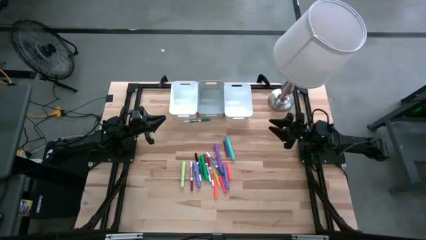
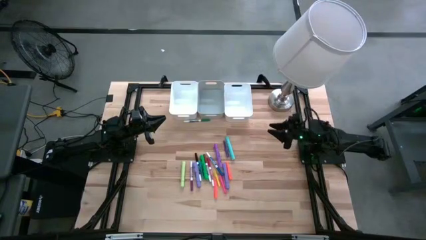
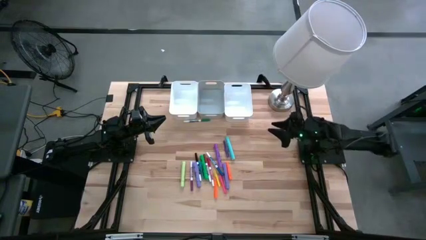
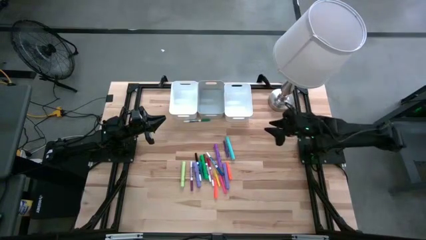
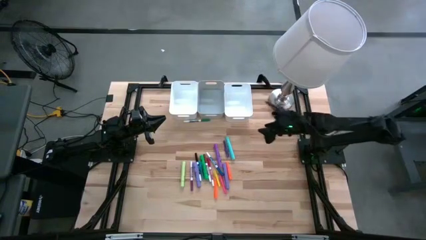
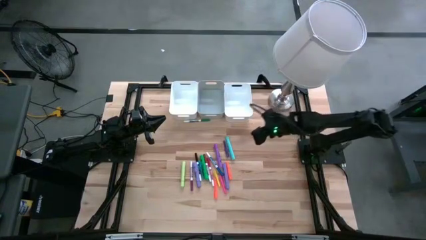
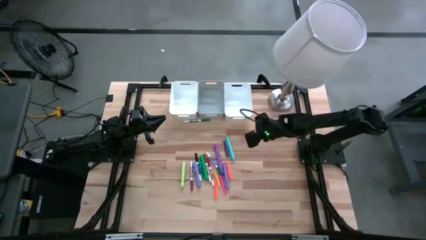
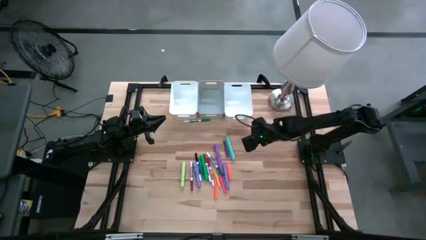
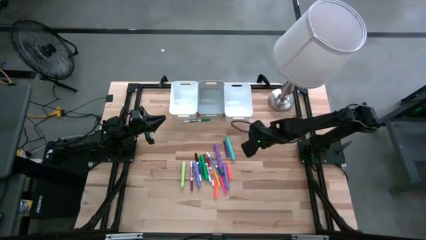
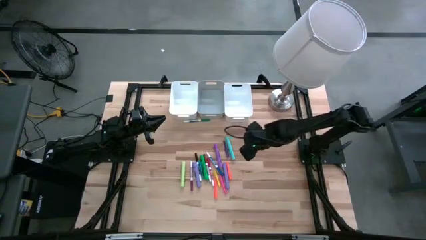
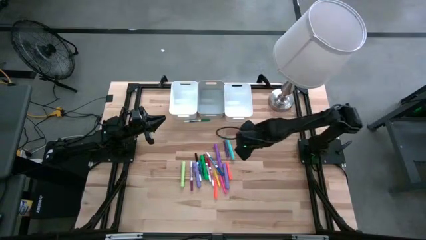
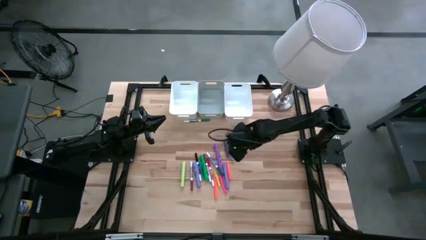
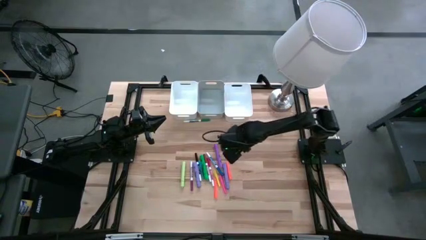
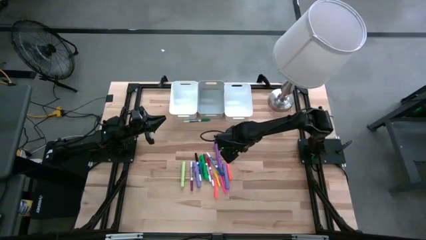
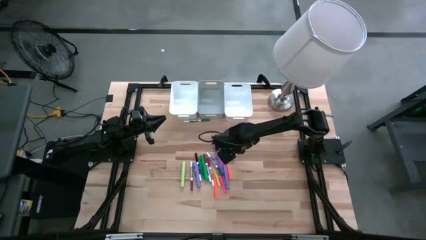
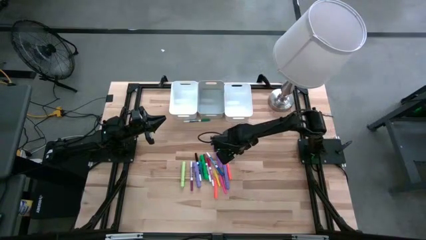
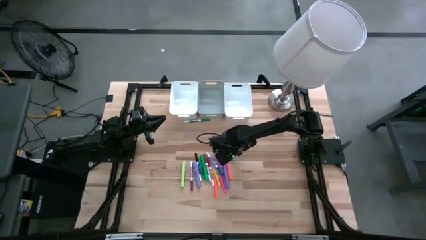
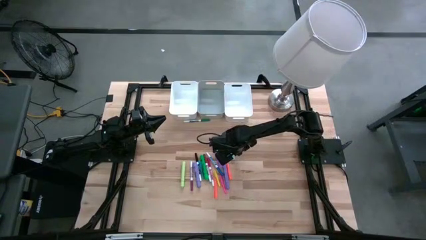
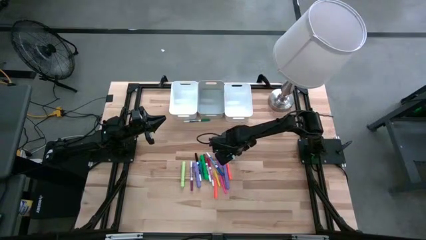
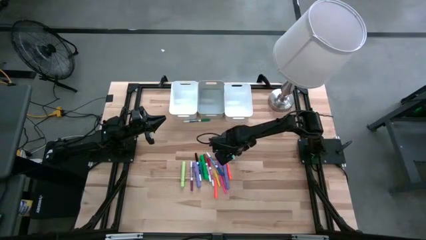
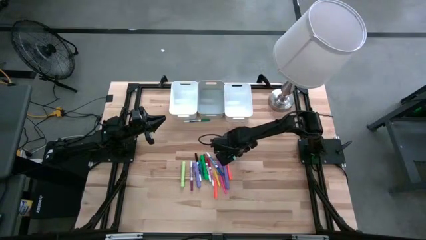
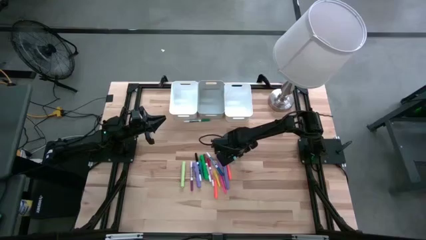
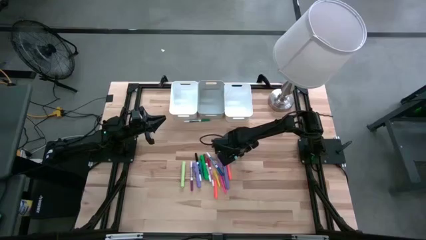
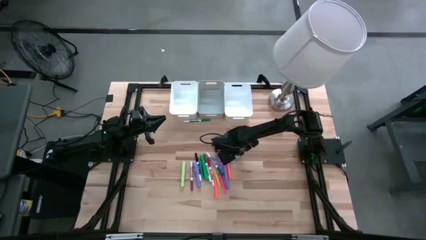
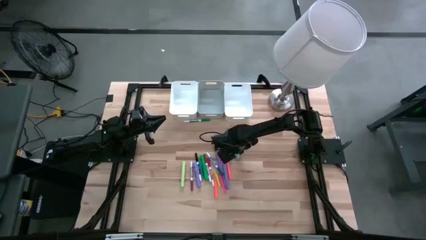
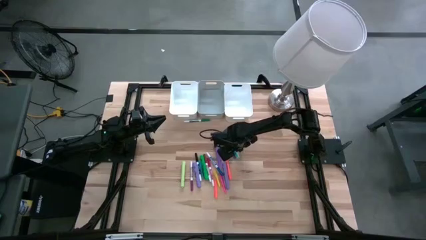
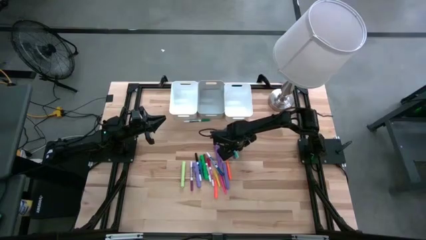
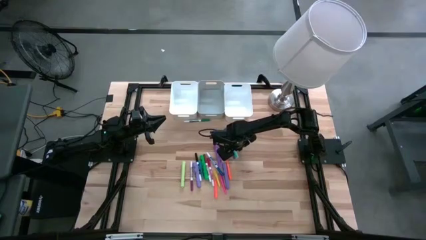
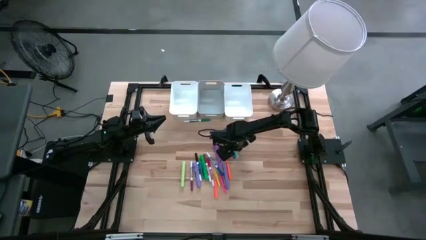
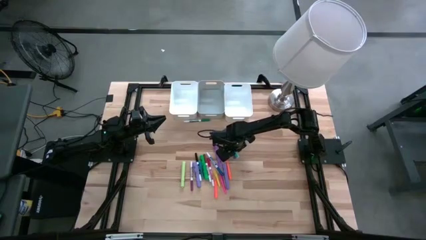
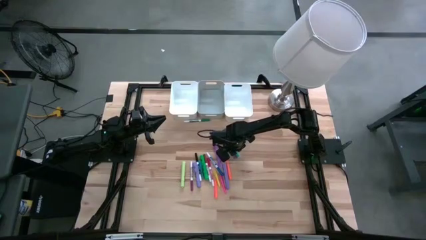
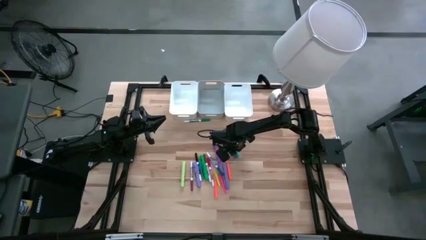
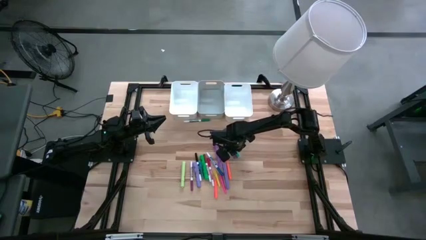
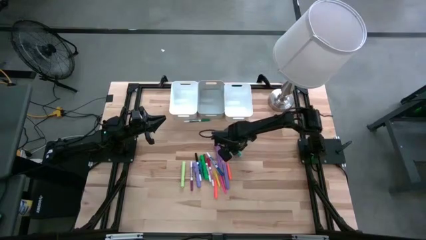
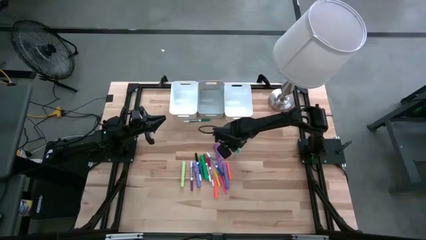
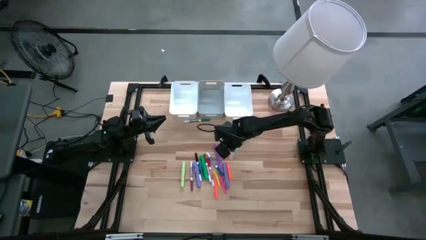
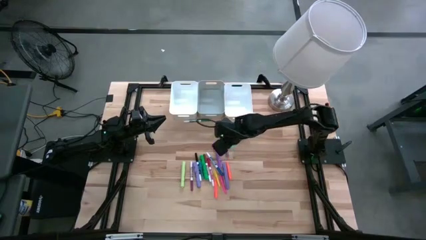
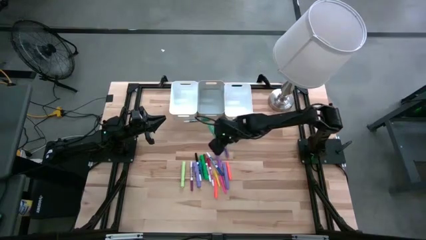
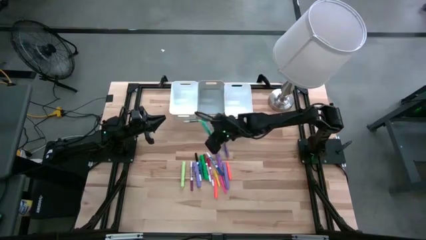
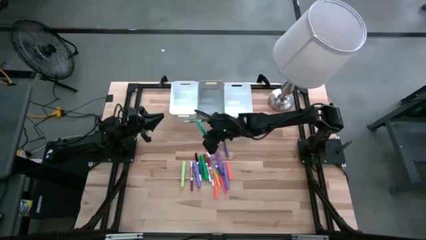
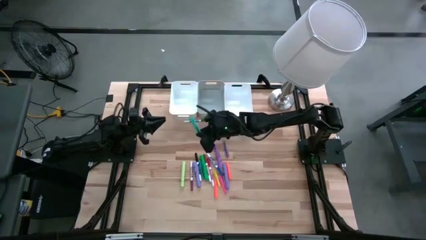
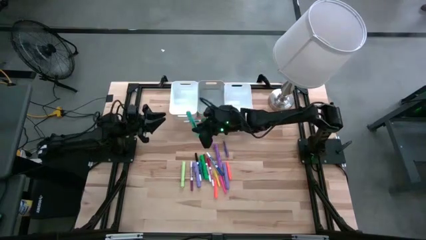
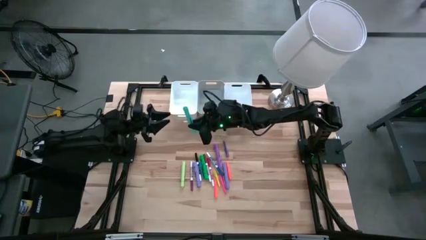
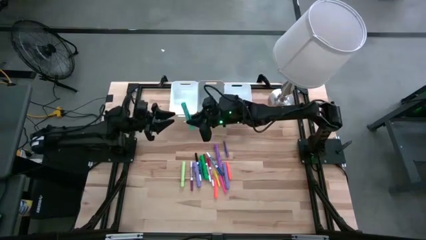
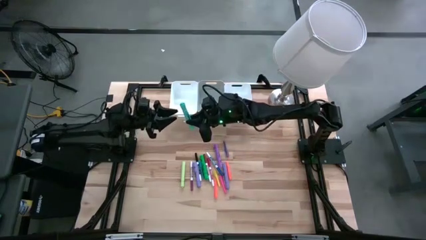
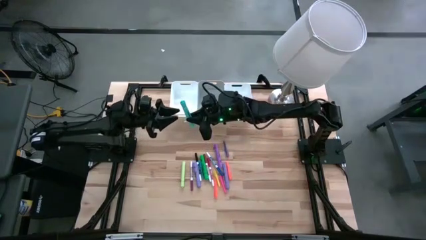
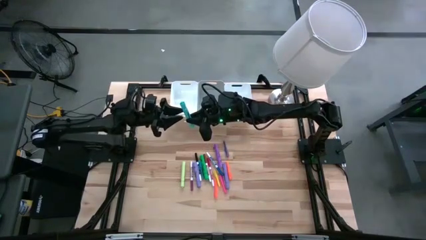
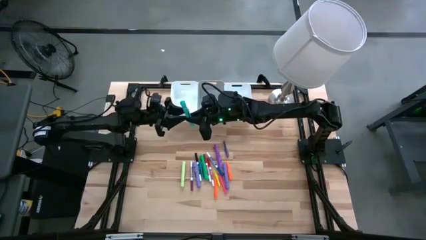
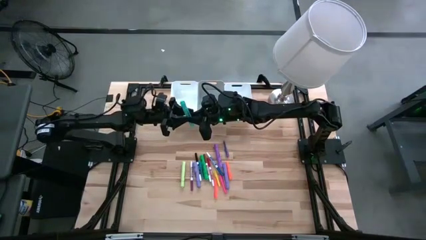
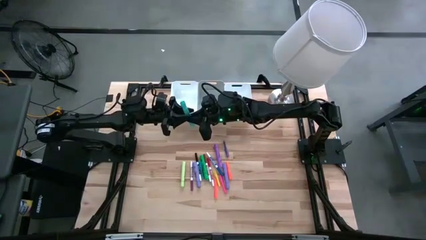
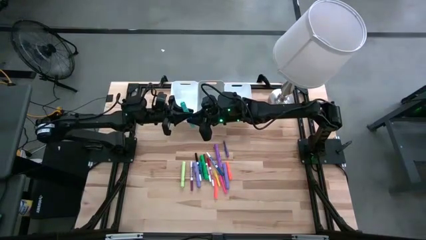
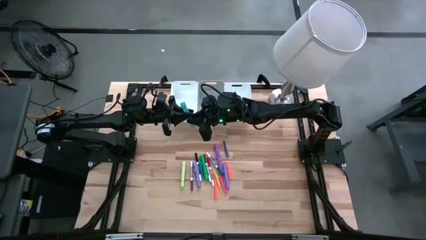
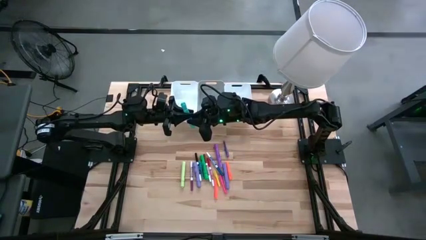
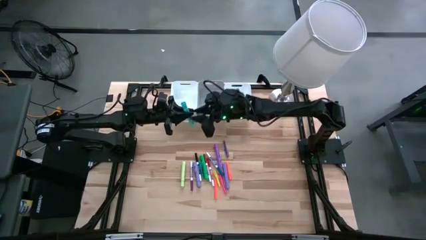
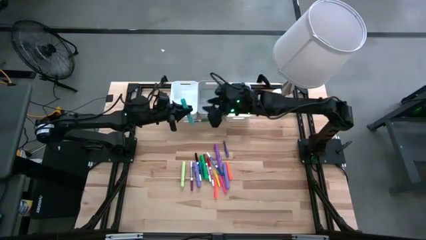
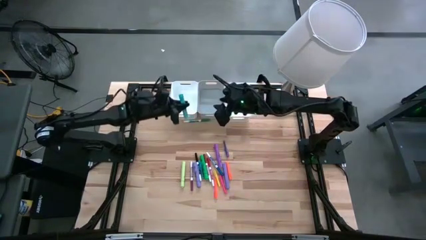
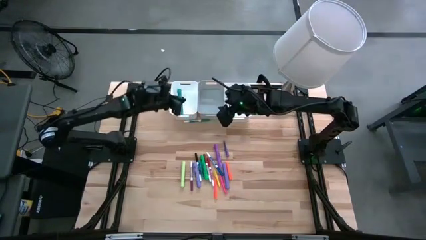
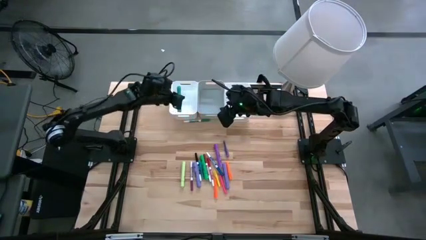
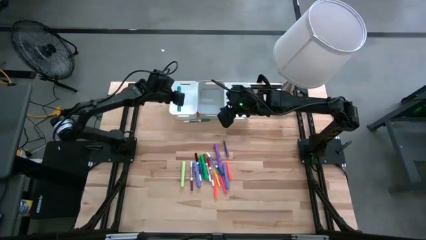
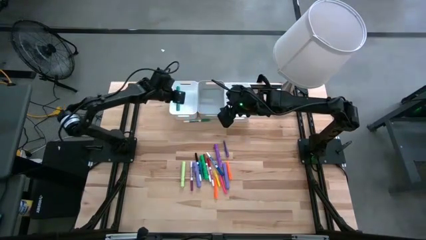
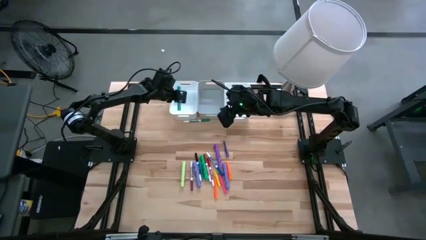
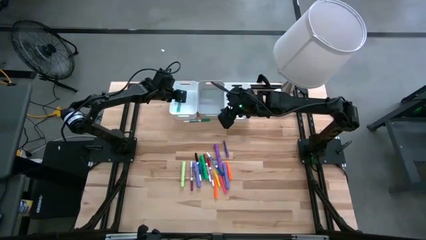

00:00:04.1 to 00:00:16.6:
Task: Pick & Place Markers
Put the blue highlighter pen into the left white bin
